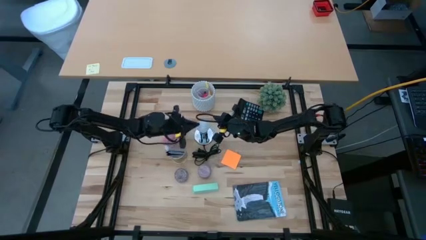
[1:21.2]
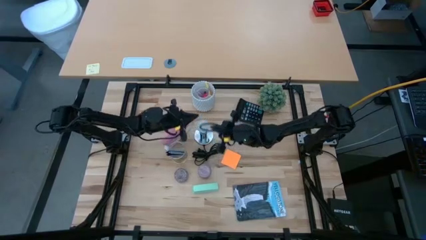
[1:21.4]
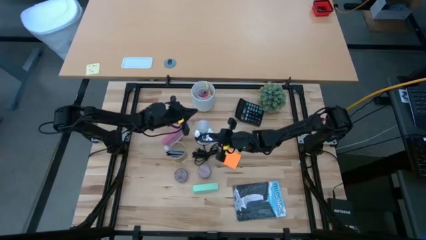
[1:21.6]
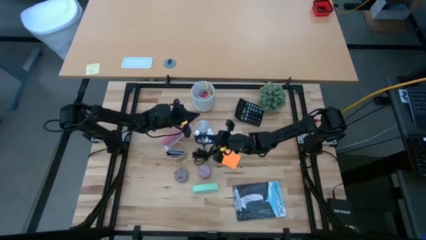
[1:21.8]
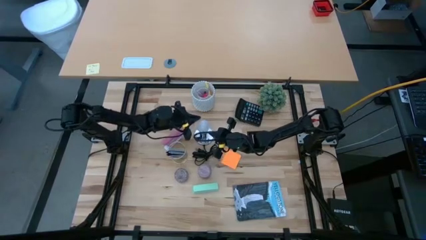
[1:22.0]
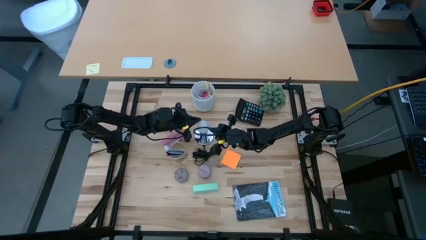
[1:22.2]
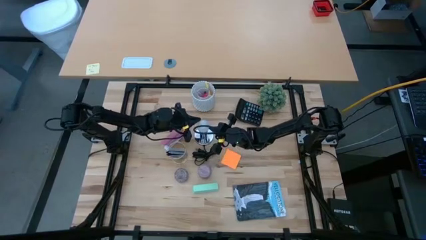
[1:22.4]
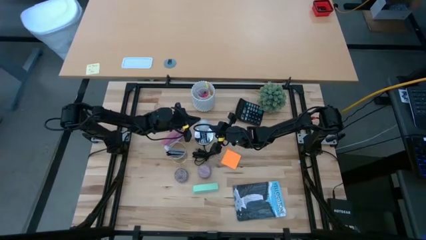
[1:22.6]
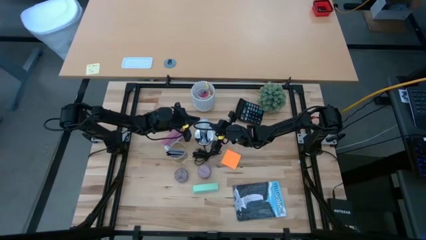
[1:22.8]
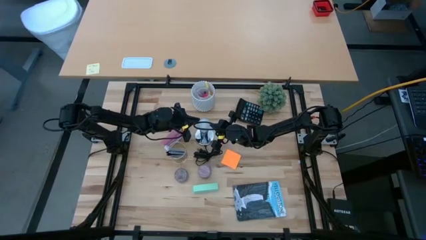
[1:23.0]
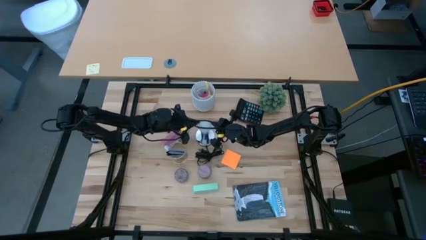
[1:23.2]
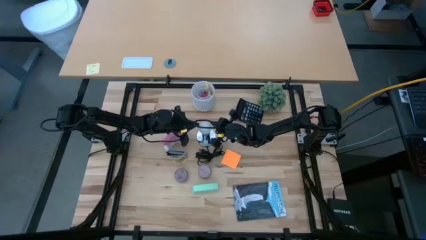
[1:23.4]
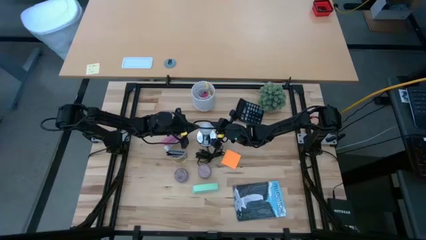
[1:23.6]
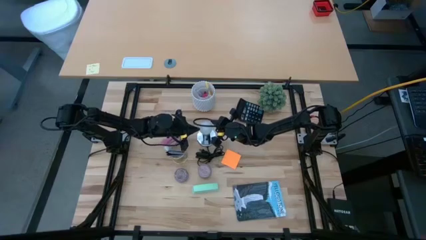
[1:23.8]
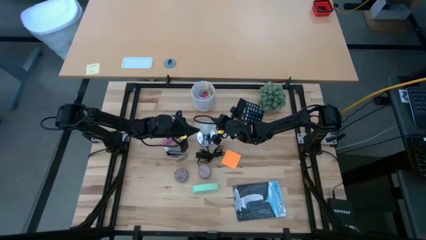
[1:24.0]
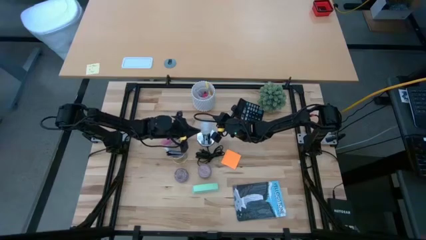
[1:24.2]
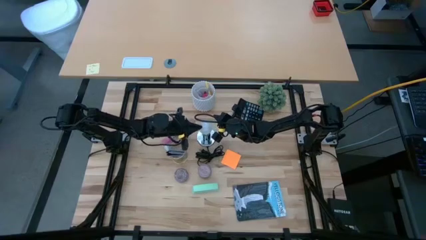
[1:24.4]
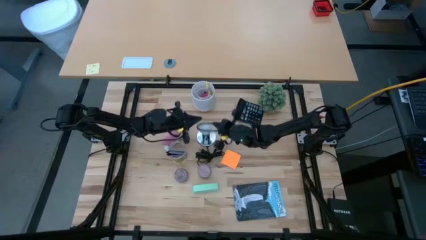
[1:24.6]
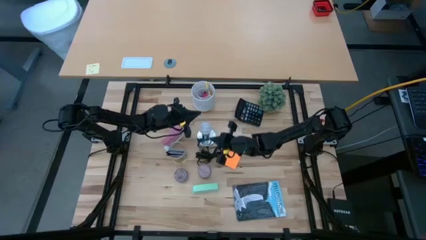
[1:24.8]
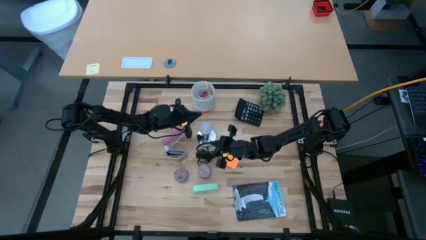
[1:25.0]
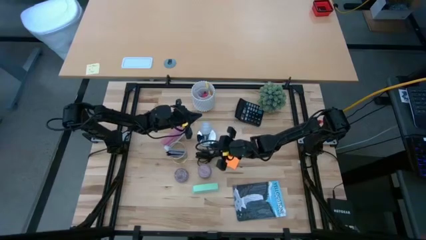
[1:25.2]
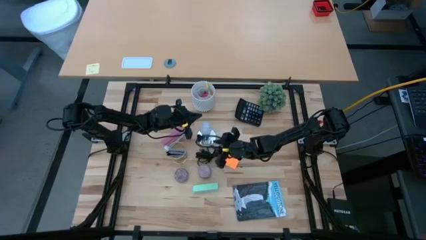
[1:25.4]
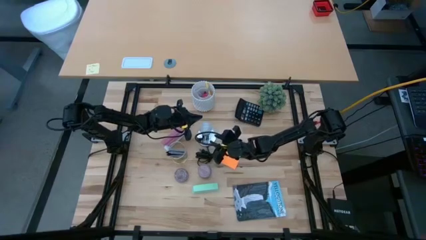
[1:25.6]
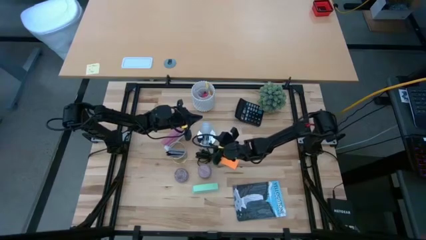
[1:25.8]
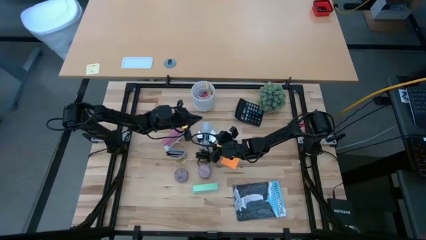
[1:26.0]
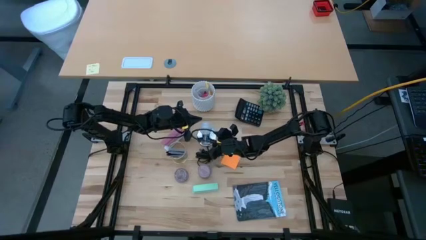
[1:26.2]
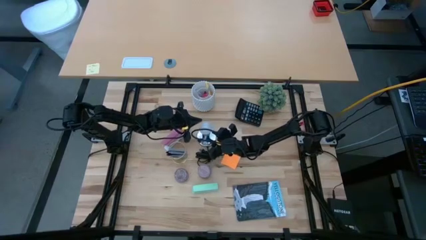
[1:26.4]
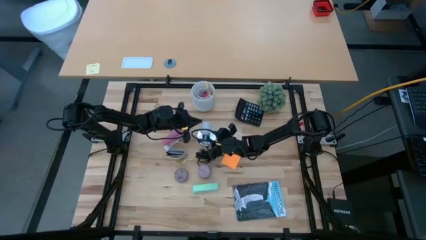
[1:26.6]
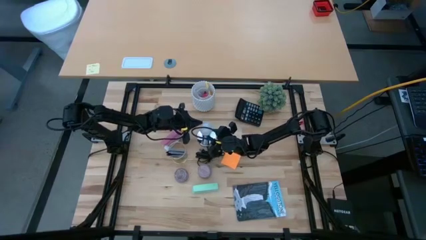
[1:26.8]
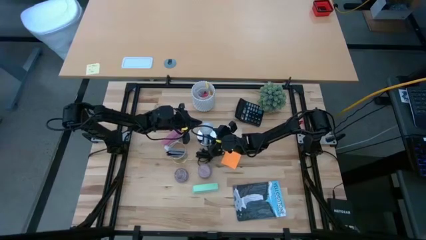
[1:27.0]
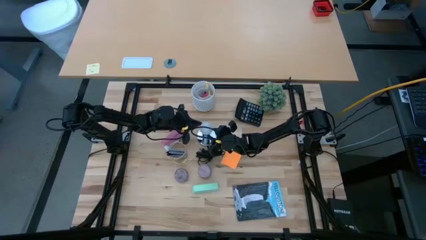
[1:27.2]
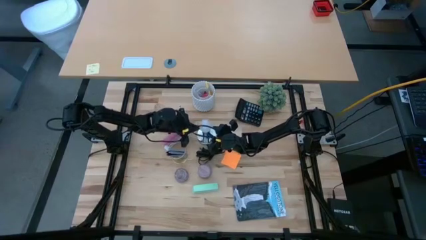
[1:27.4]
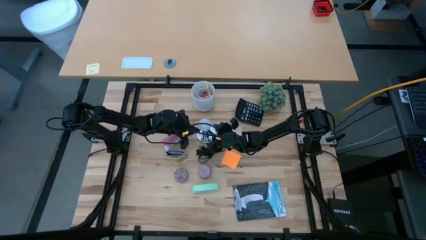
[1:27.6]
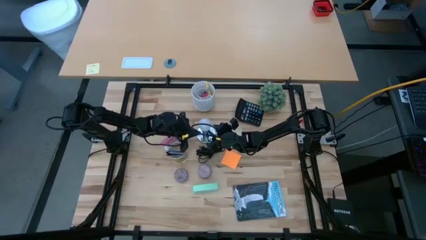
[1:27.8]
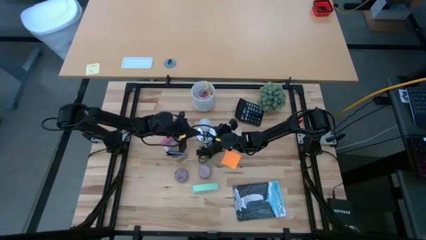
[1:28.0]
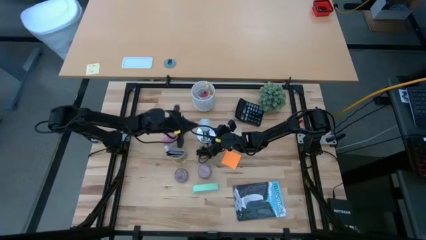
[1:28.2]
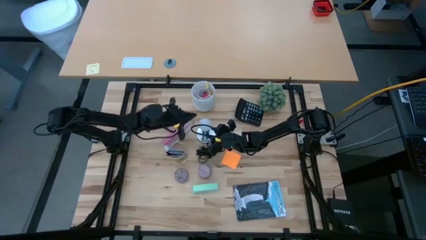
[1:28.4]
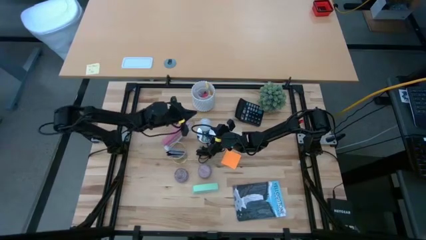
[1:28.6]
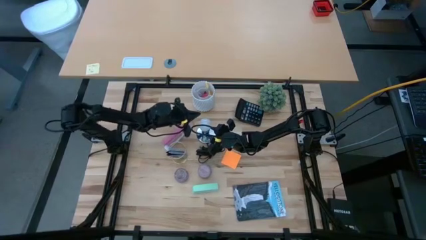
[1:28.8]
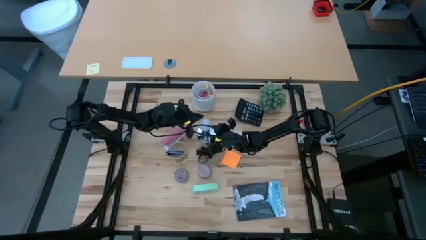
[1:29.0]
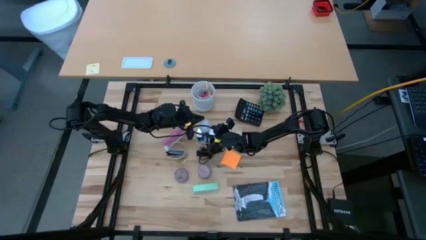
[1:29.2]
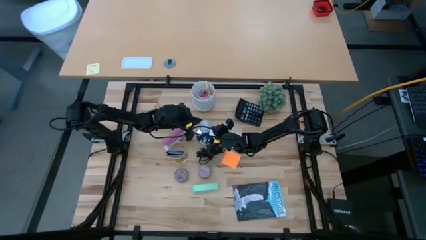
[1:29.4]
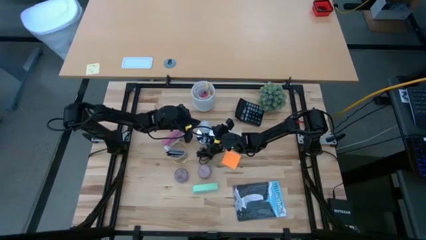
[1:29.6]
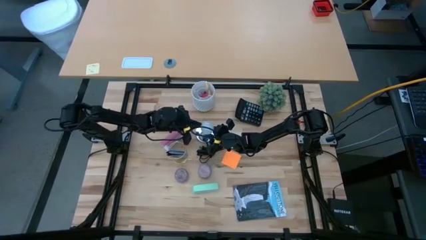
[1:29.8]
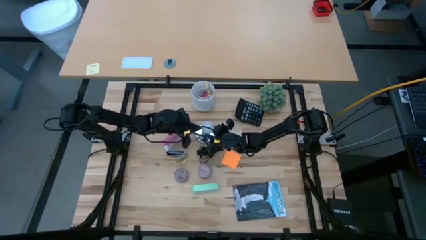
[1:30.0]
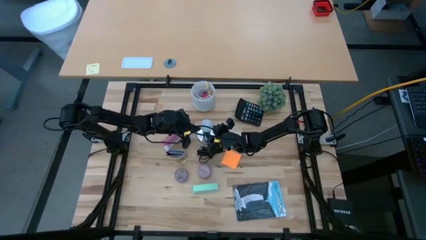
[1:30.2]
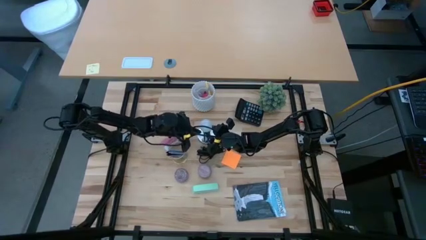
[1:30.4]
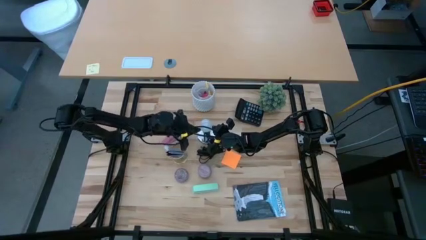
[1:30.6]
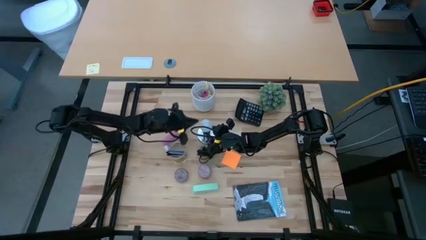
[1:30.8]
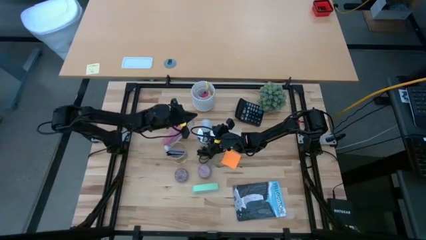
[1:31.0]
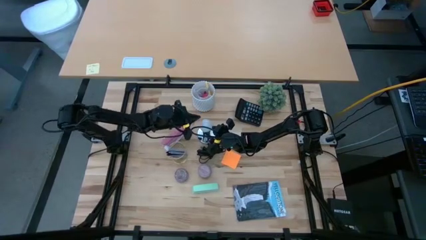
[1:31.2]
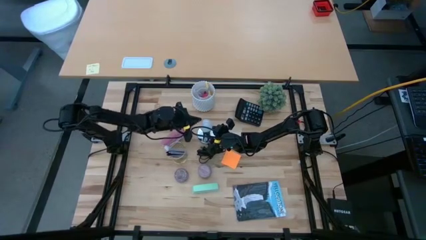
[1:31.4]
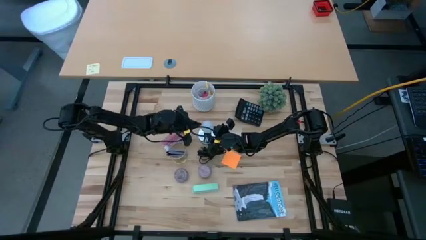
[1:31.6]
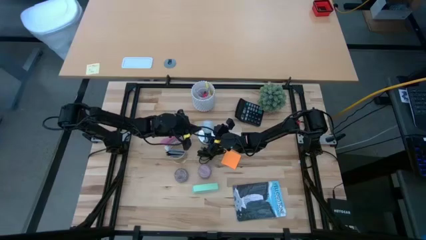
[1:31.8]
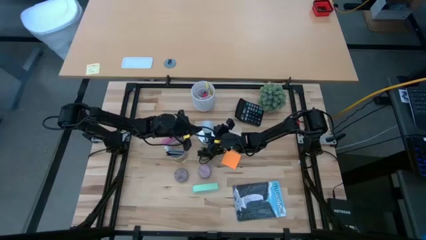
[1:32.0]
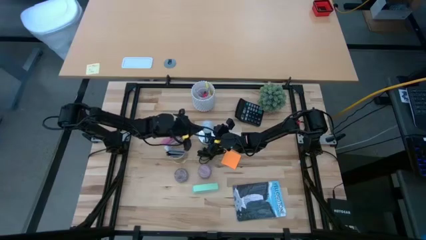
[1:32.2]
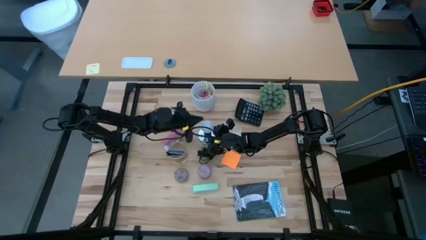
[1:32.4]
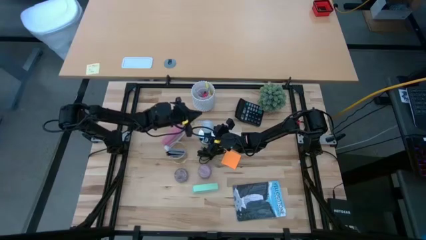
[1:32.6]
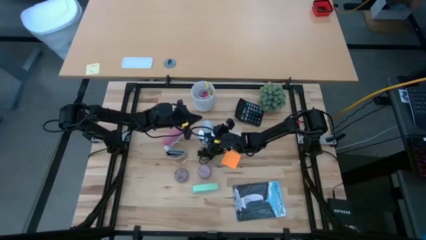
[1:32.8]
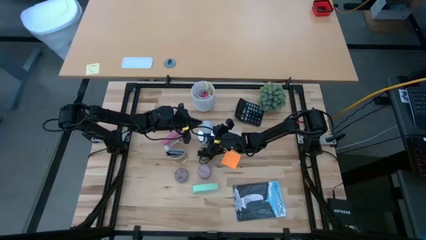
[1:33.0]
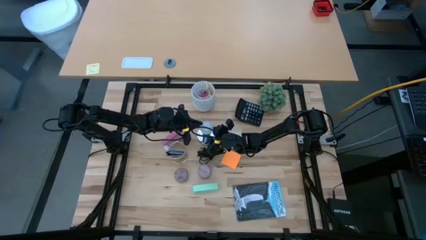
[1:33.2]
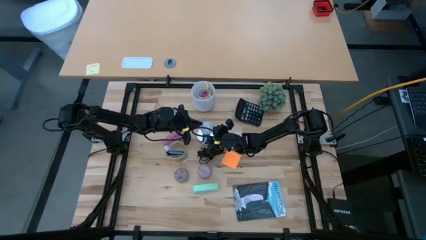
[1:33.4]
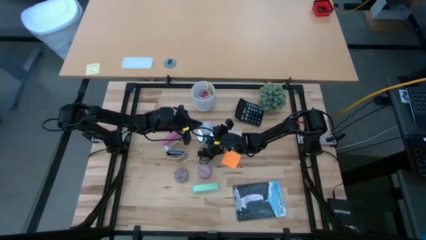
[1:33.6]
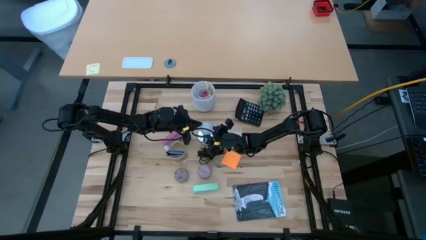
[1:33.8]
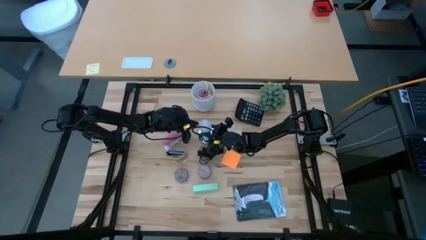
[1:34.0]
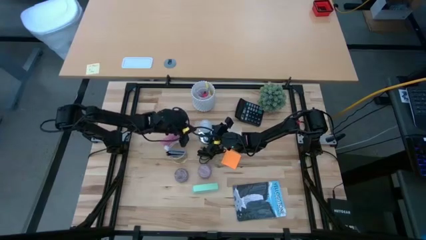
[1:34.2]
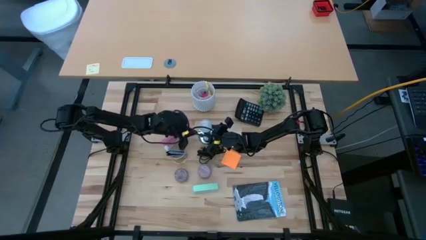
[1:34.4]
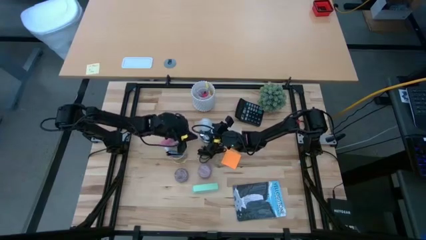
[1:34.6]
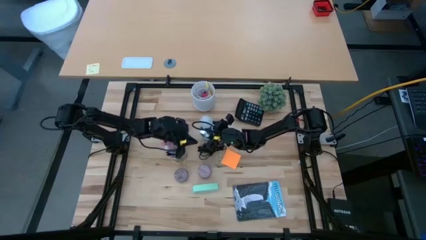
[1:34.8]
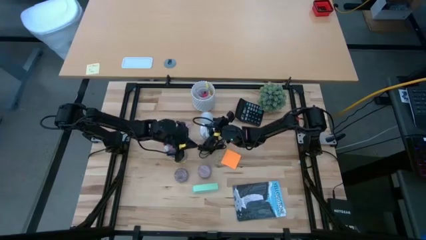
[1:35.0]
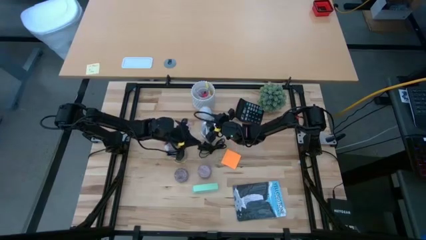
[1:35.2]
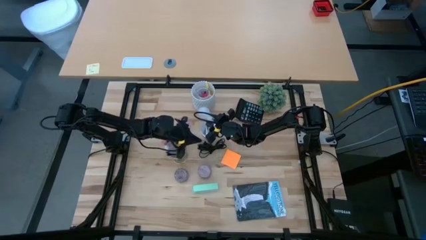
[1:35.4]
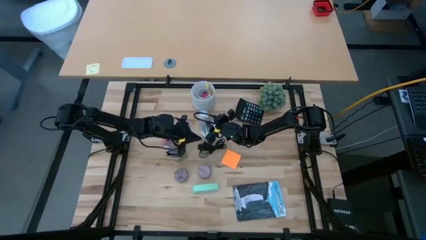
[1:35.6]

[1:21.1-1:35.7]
Task: Screw lightbulb
Remove the white lightbulb from the silver lamp
